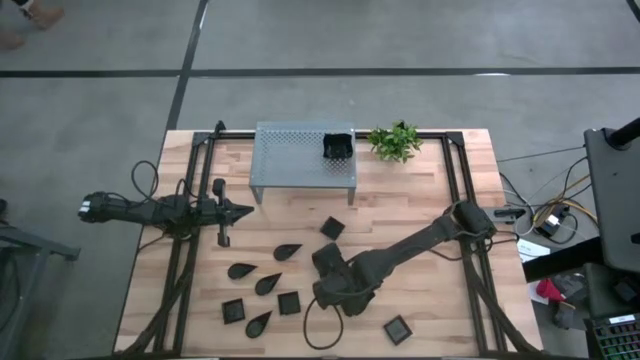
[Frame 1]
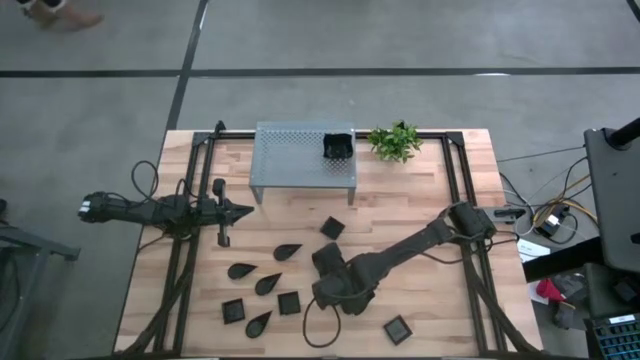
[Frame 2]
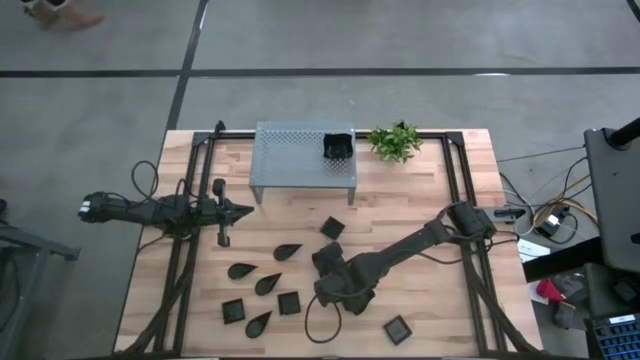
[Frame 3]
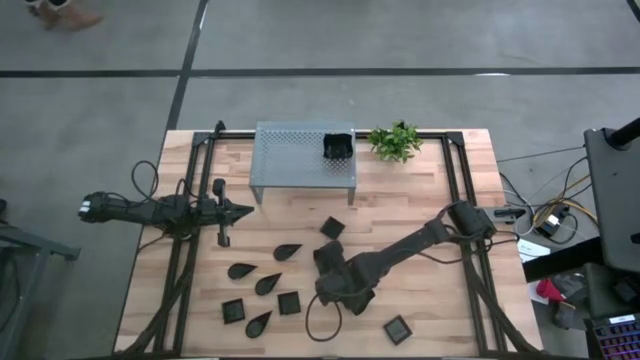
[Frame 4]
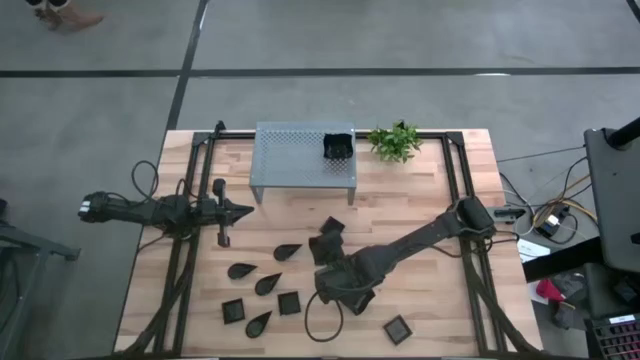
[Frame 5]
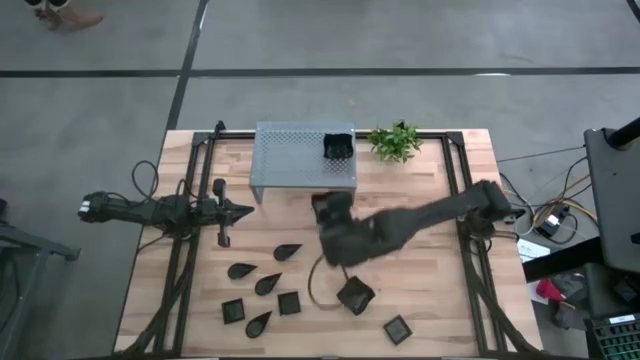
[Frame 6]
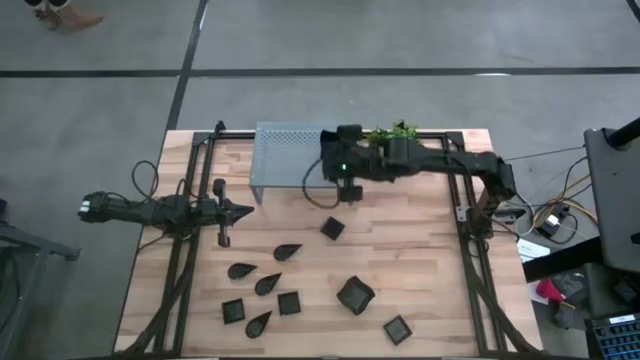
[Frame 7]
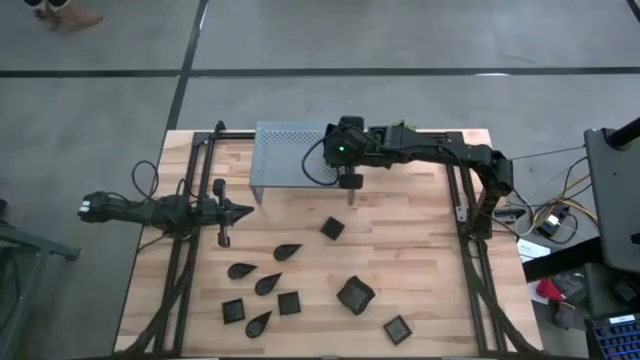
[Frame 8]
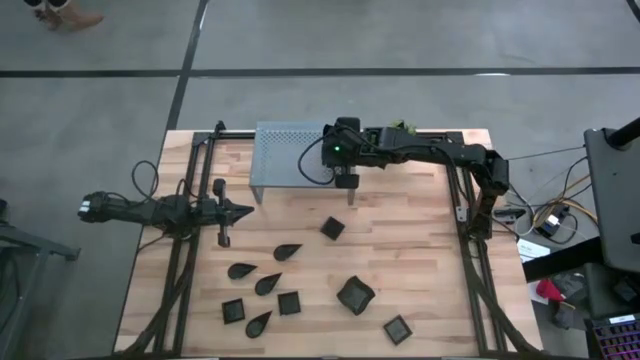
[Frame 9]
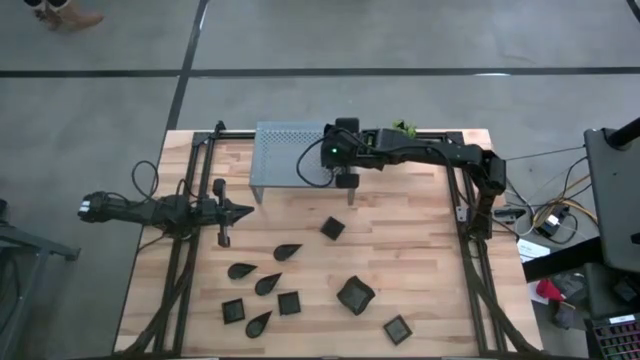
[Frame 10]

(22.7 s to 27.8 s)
Task: Pick & Place Mini shaped plates
Stack the black distorted square plate on top of the black distorted square plates on the shelf

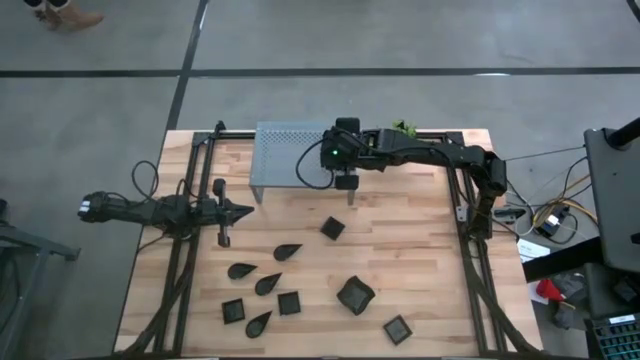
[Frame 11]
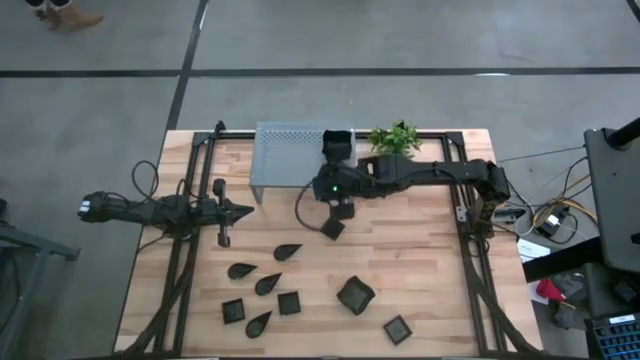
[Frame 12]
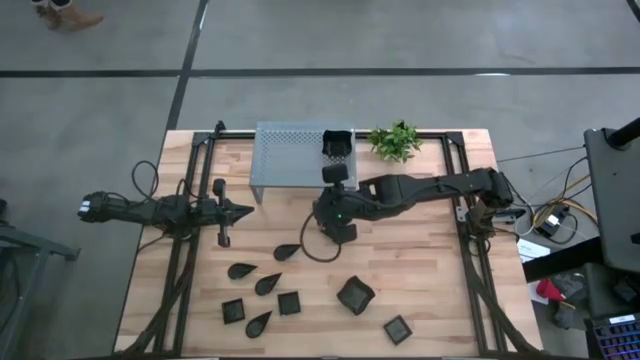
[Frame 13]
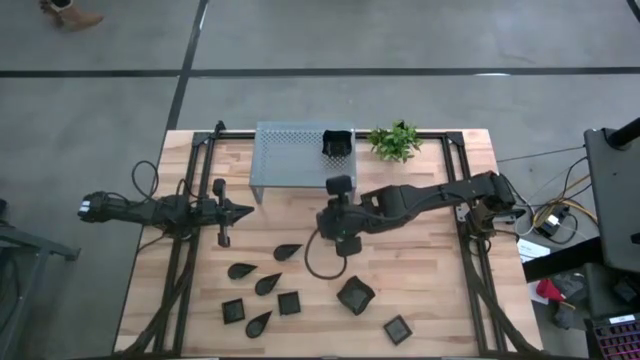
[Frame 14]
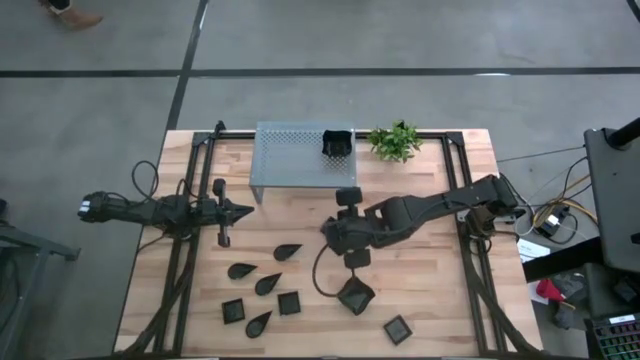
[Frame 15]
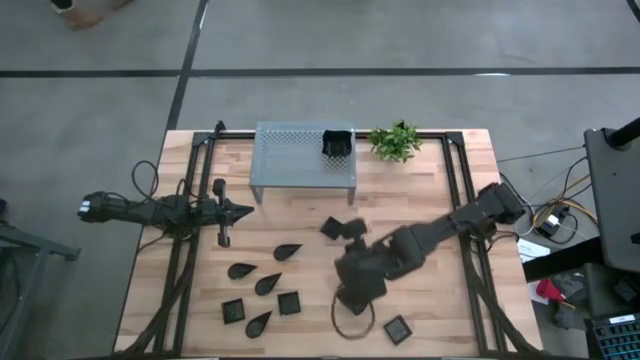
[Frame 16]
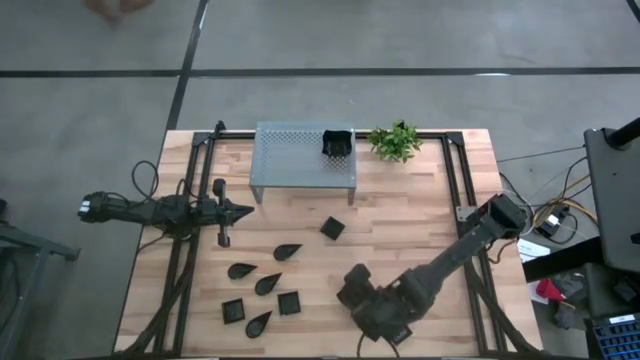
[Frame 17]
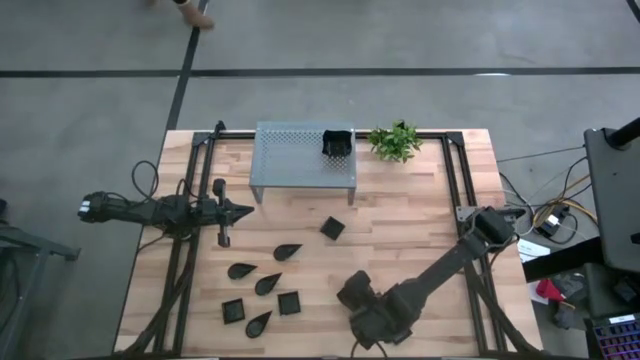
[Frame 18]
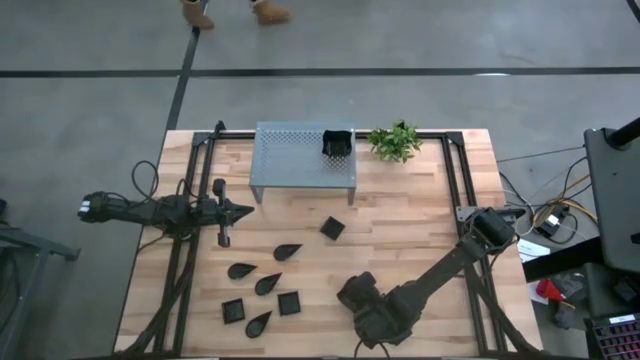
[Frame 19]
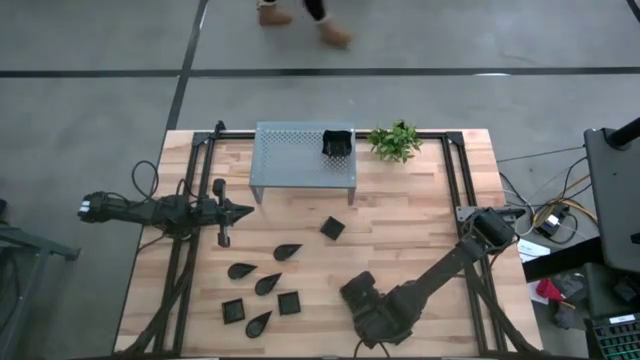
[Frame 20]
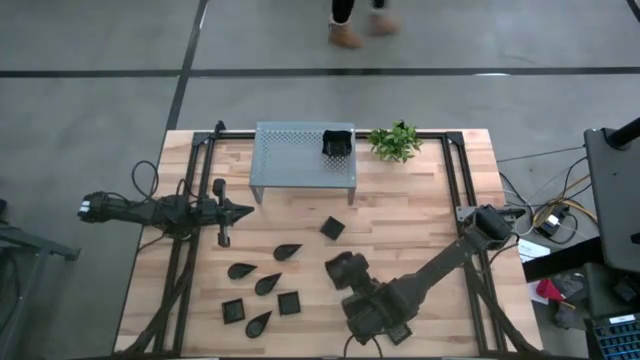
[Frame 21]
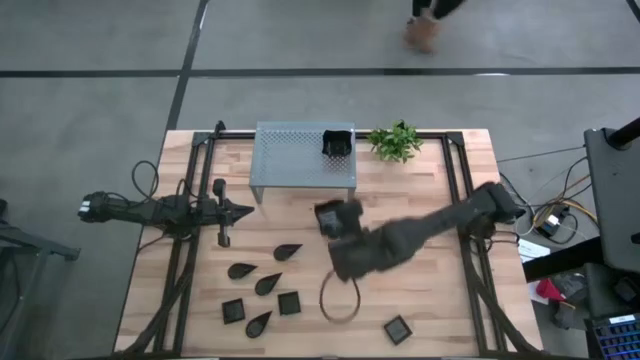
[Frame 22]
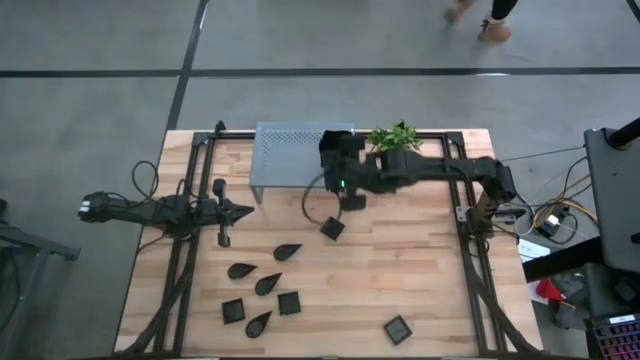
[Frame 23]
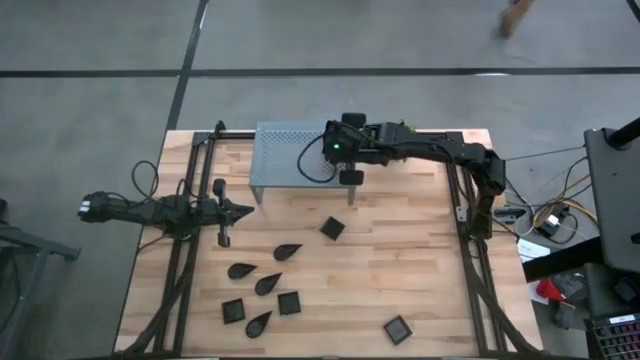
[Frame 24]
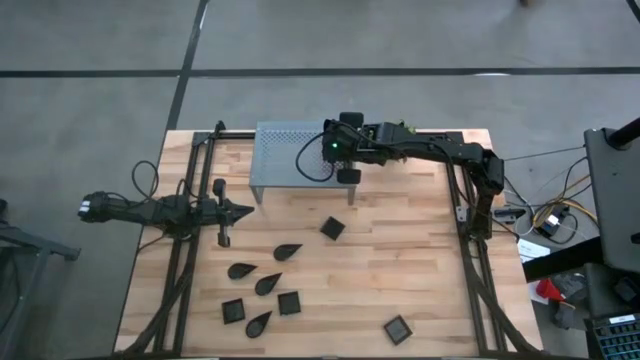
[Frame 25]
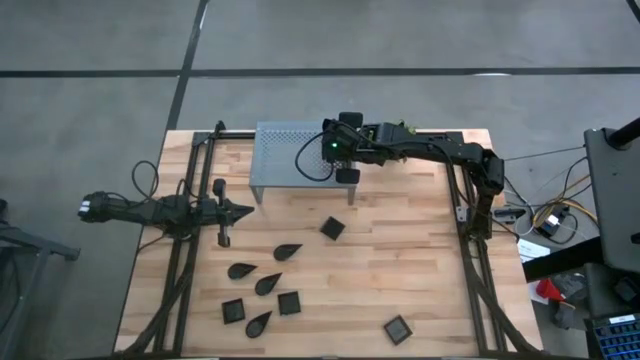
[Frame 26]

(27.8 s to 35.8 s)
Stack the black distorted square plate on top of the black distorted square plates on the shelf

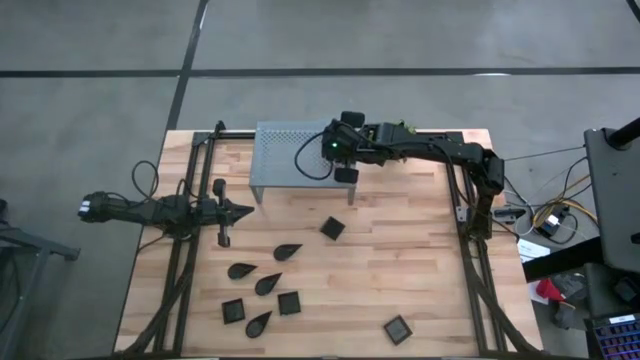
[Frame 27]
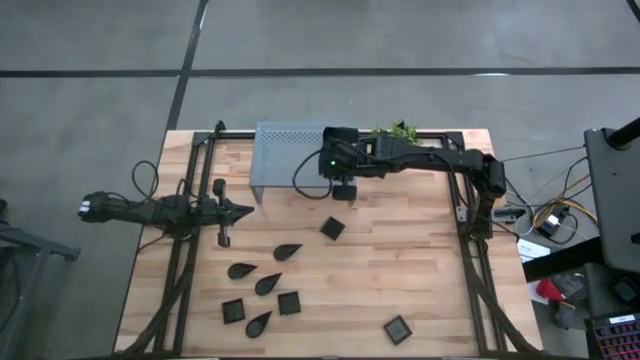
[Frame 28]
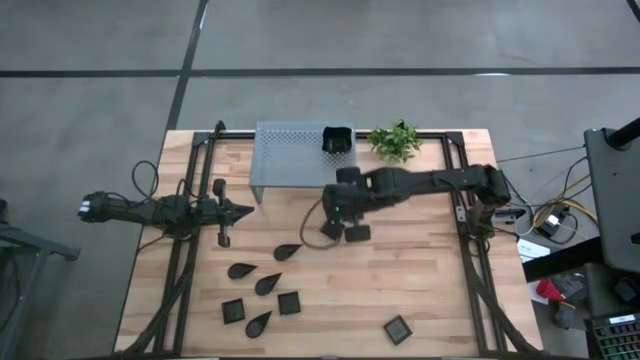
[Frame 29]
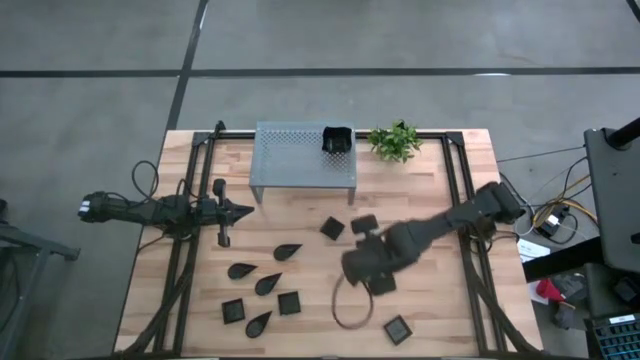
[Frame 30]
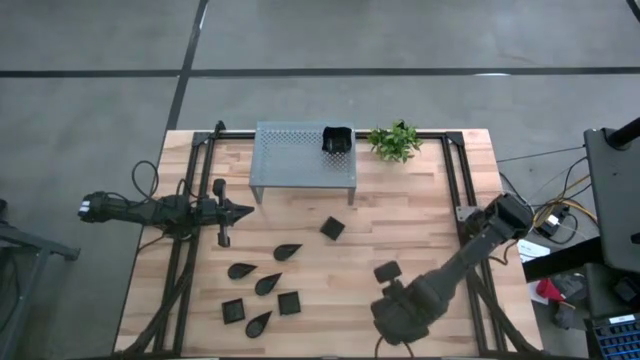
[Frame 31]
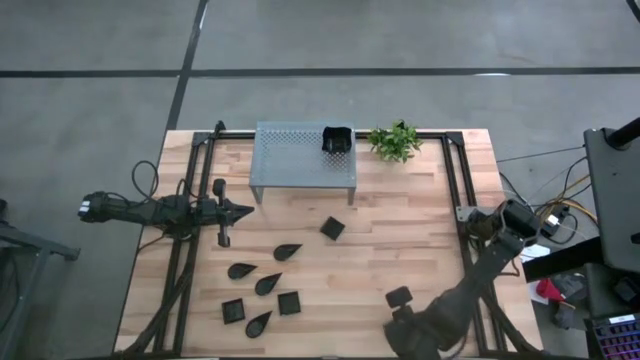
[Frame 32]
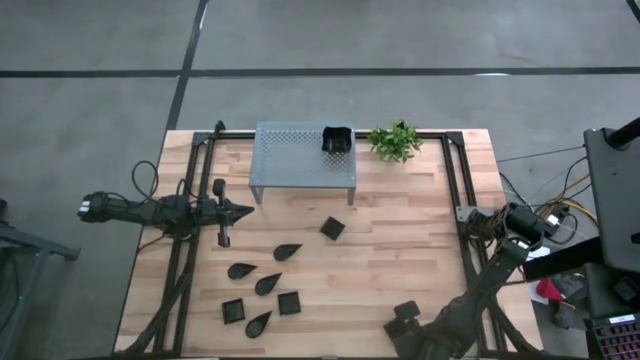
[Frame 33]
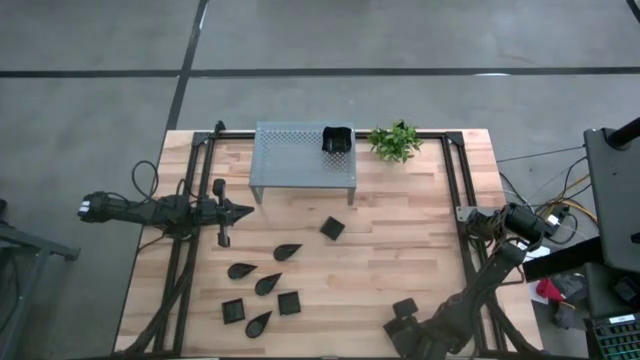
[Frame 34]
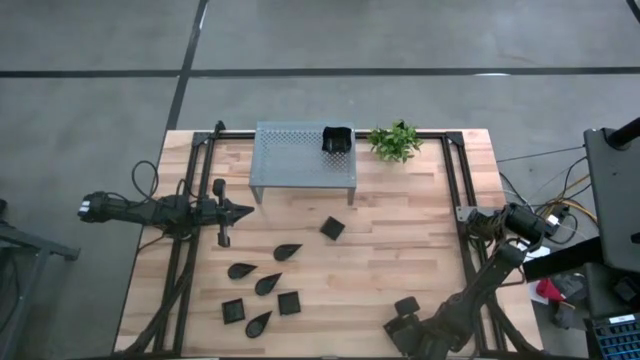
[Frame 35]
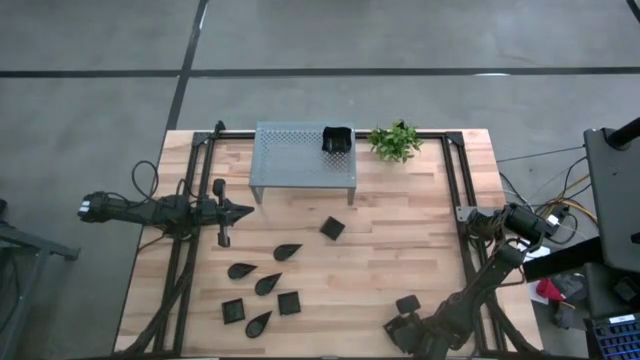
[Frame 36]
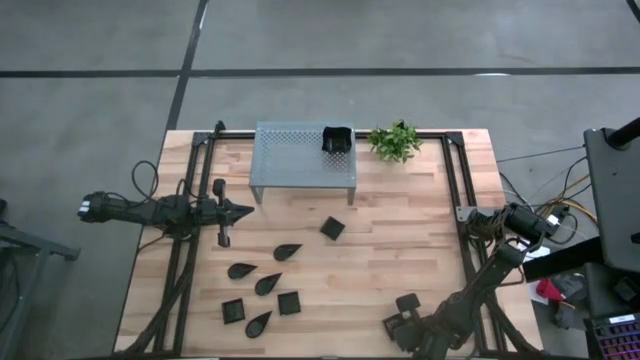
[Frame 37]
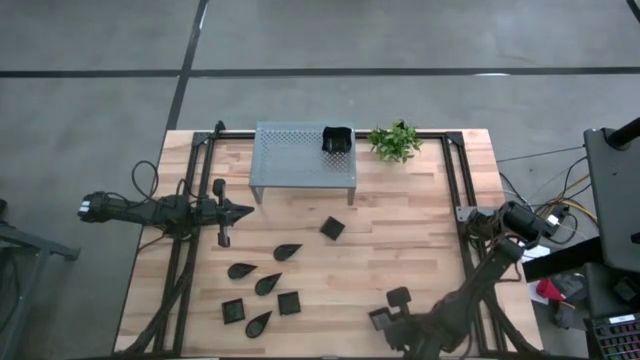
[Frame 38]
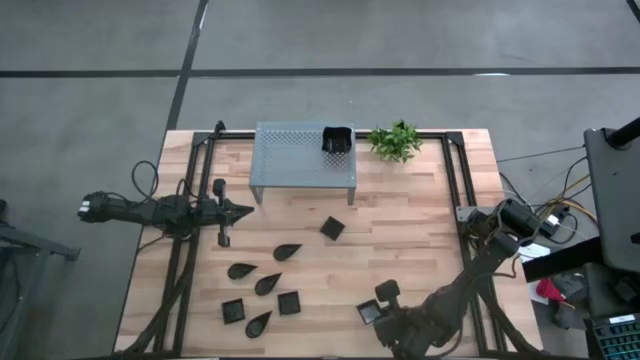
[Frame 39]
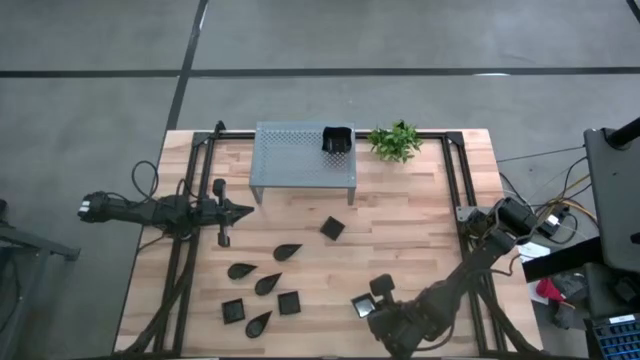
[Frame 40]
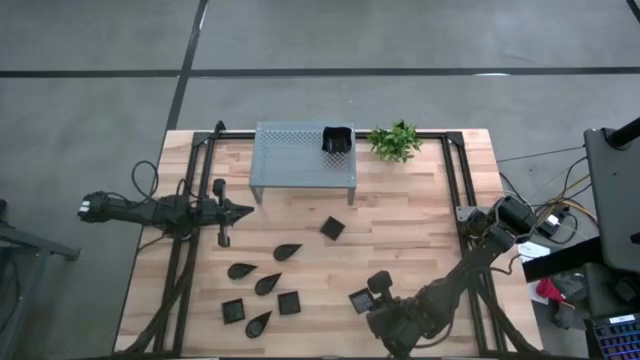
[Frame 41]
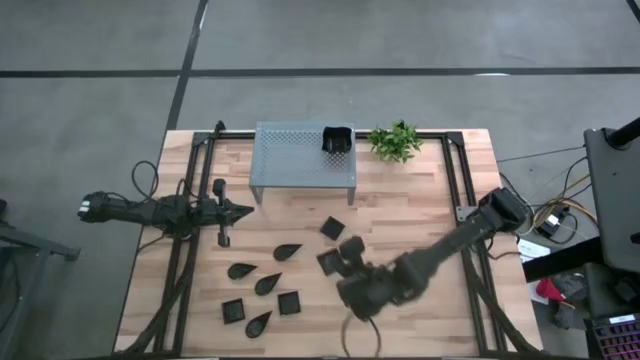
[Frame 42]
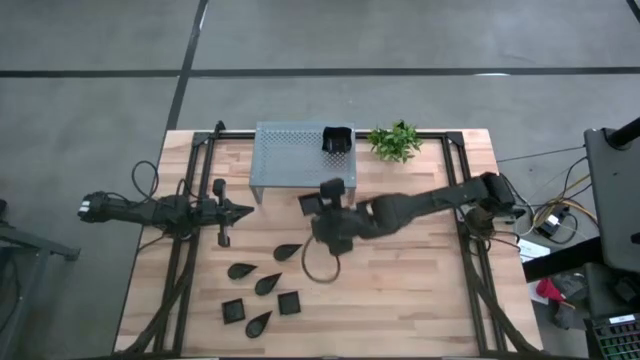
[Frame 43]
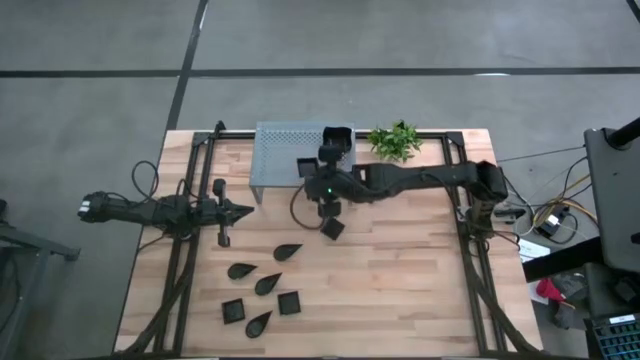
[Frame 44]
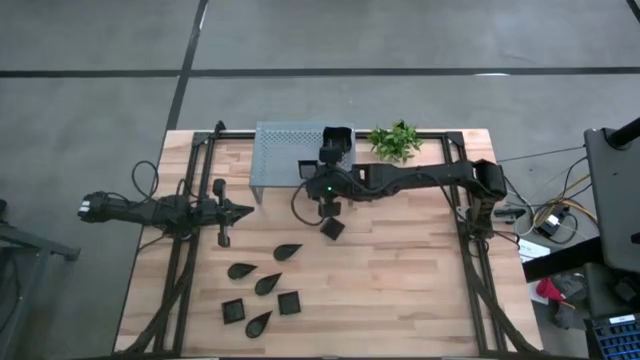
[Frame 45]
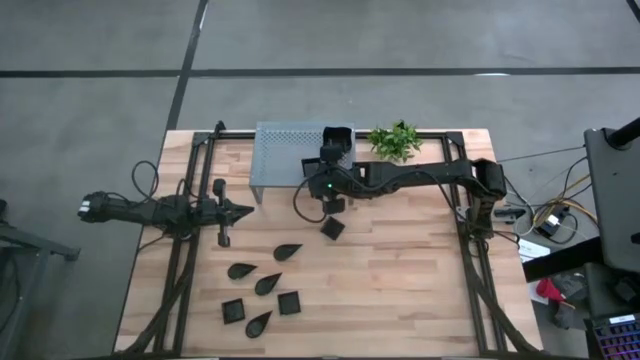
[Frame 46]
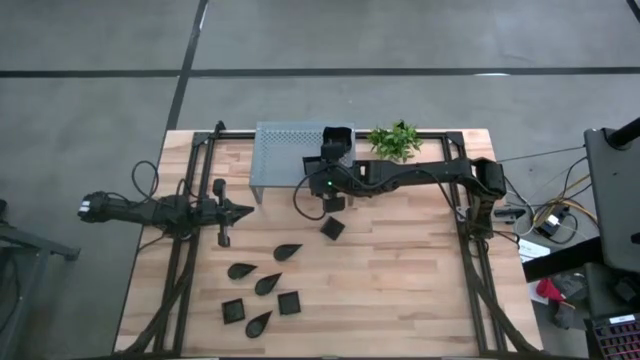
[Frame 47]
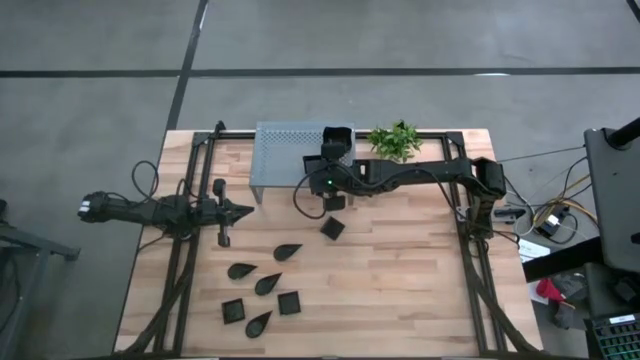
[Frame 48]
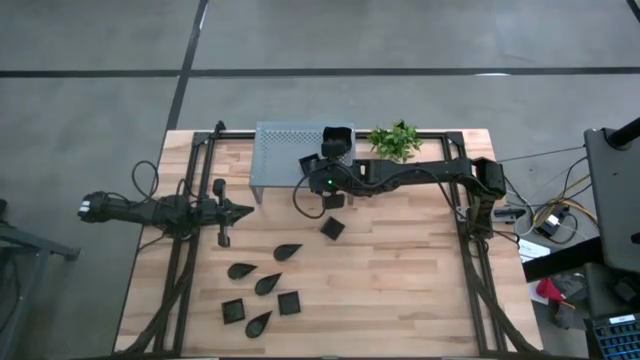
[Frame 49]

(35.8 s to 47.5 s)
Put the black square plate on the shelf
